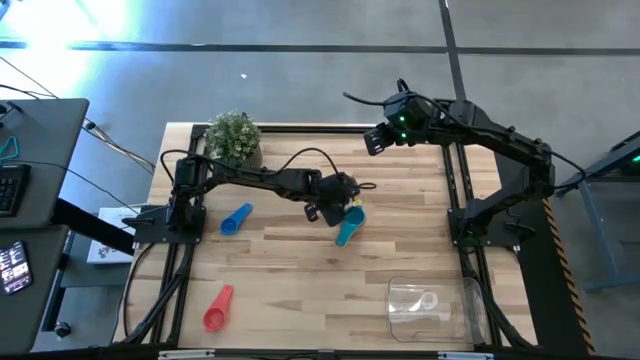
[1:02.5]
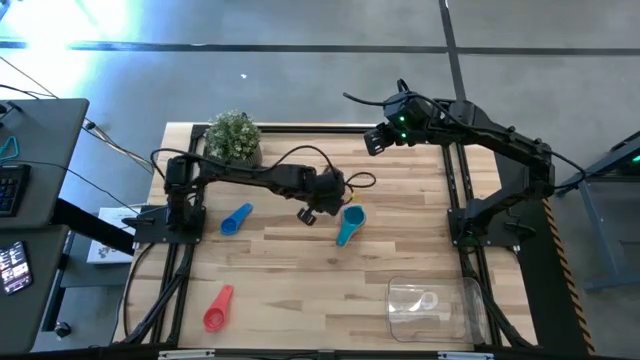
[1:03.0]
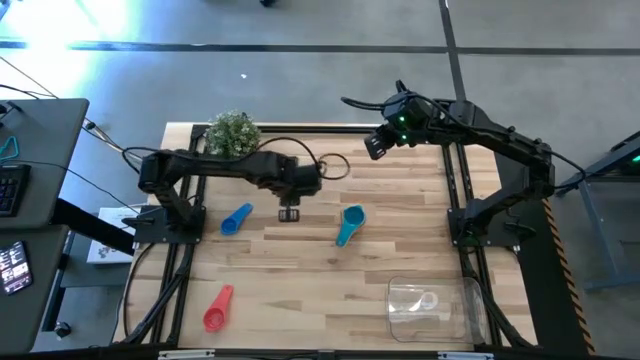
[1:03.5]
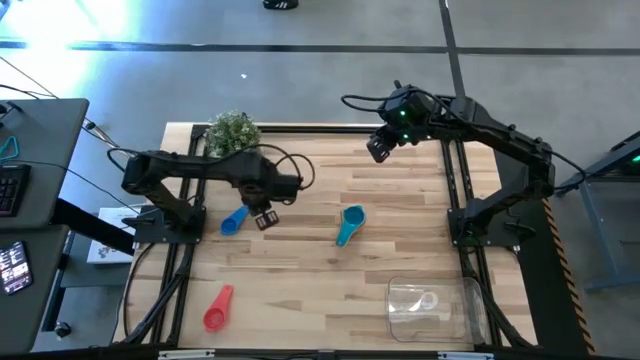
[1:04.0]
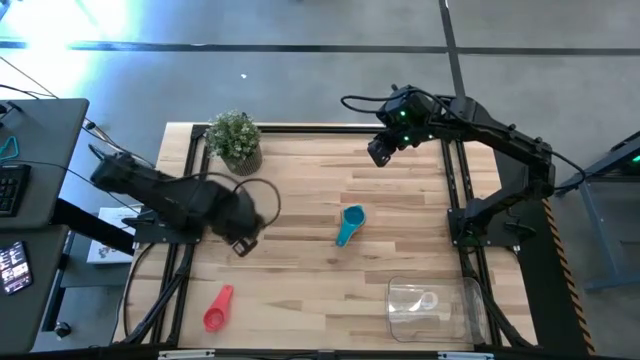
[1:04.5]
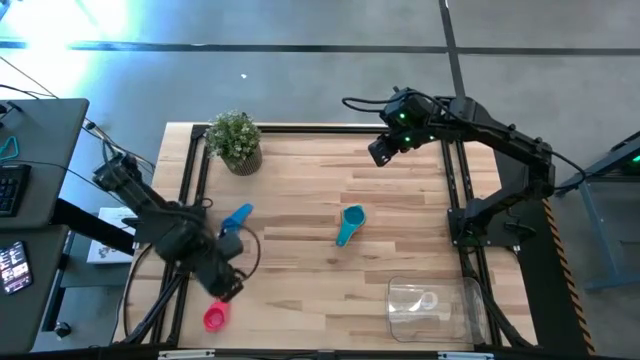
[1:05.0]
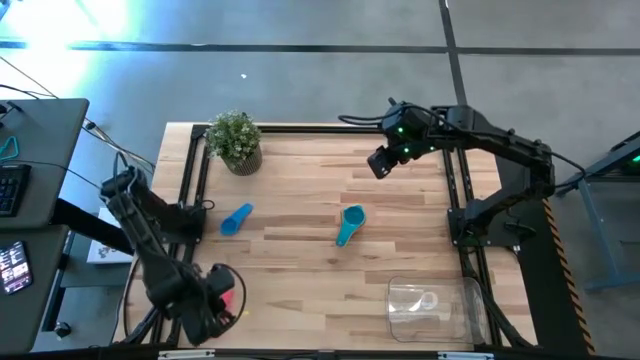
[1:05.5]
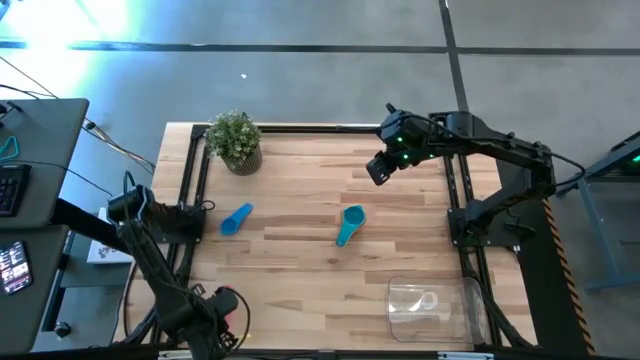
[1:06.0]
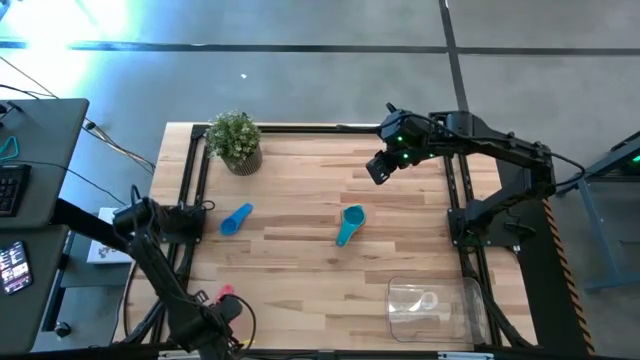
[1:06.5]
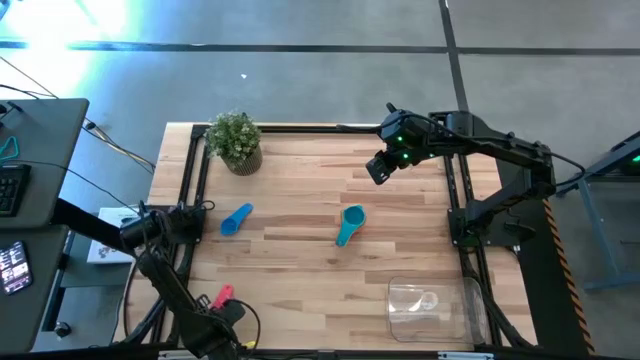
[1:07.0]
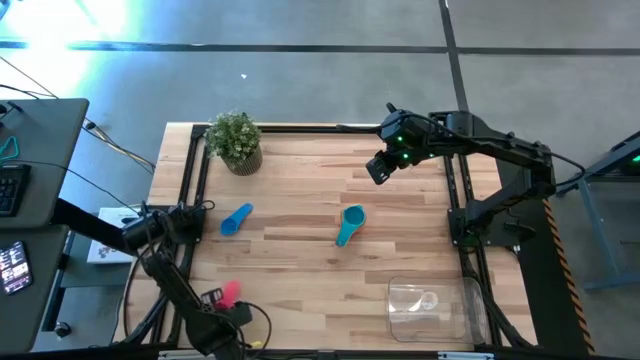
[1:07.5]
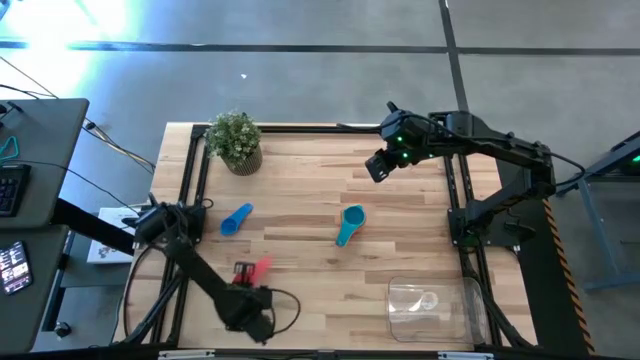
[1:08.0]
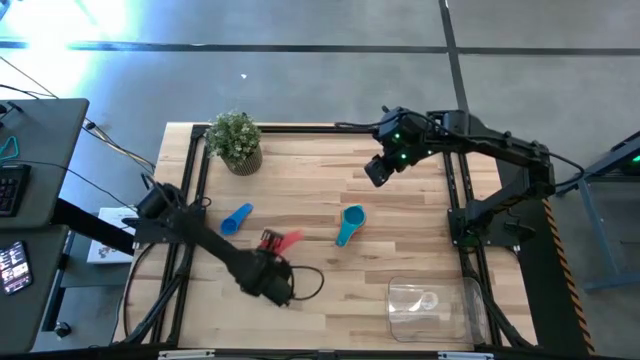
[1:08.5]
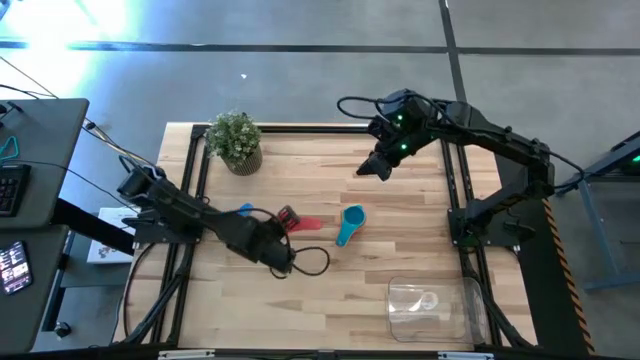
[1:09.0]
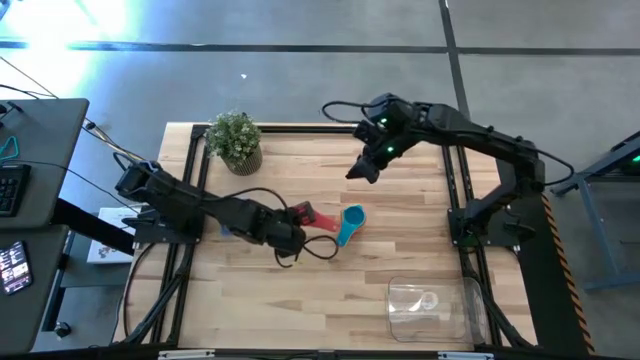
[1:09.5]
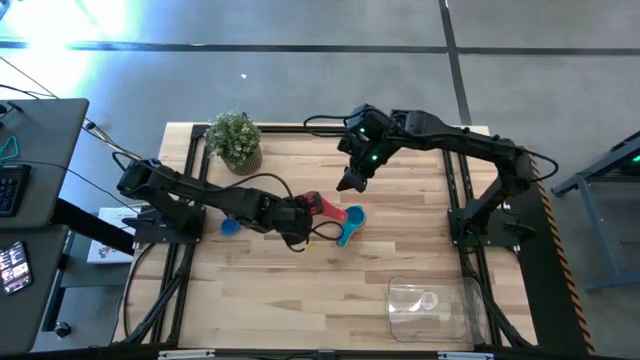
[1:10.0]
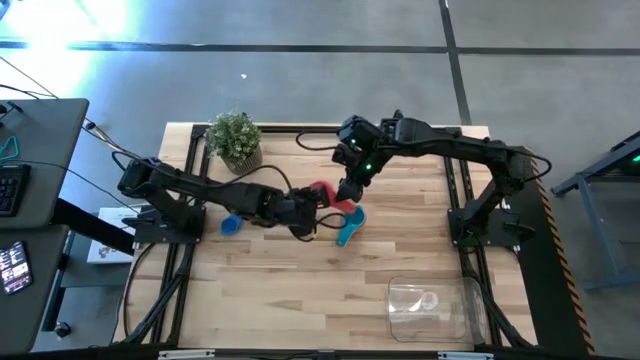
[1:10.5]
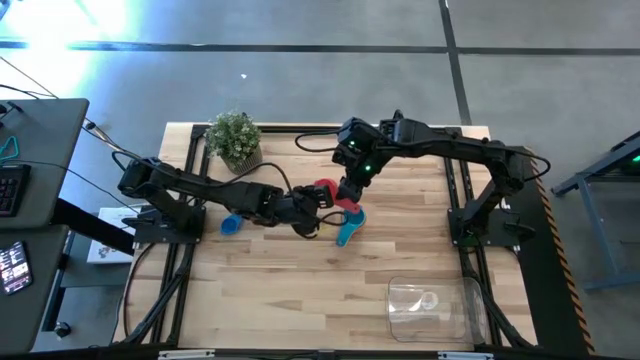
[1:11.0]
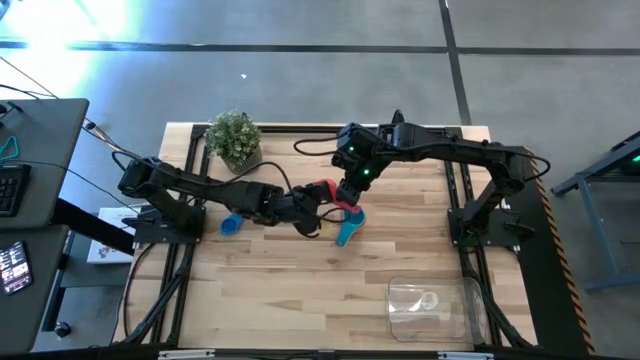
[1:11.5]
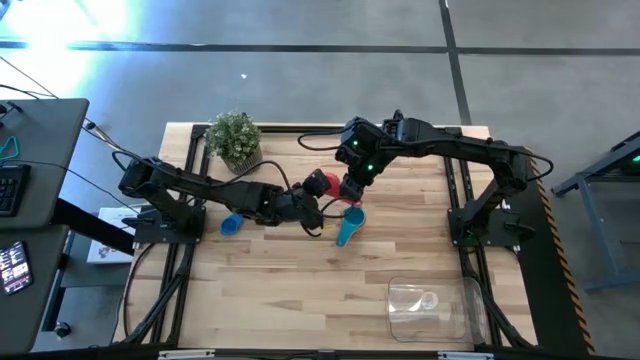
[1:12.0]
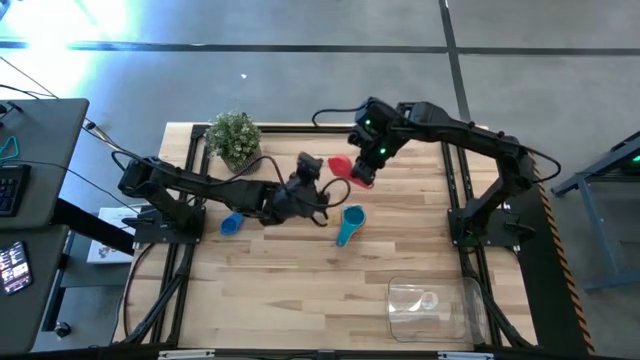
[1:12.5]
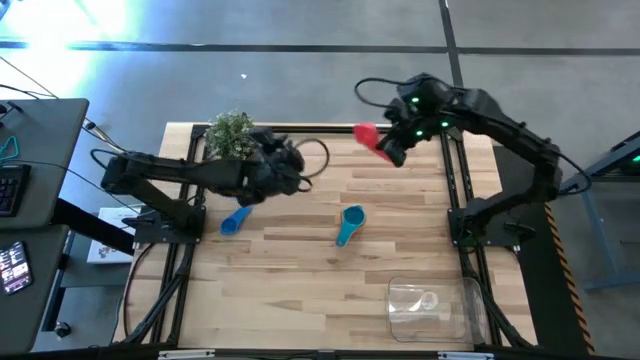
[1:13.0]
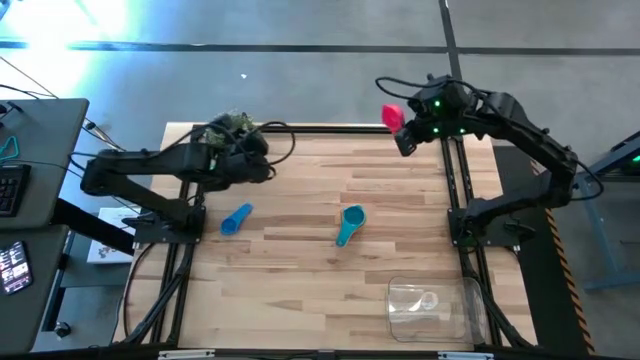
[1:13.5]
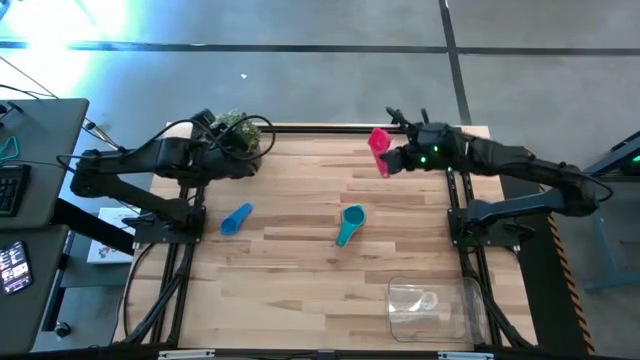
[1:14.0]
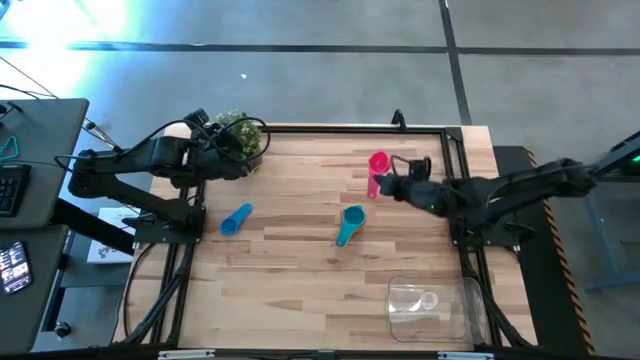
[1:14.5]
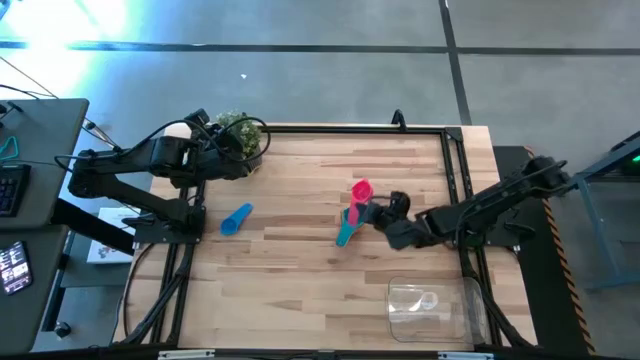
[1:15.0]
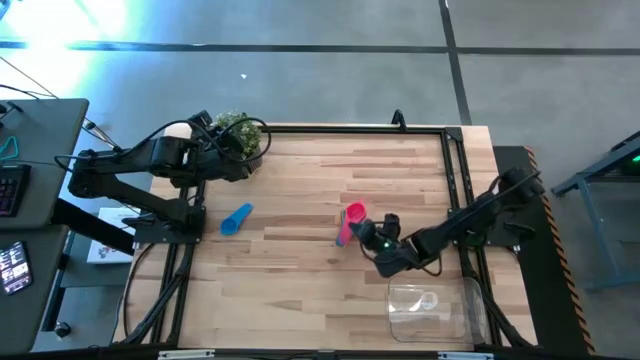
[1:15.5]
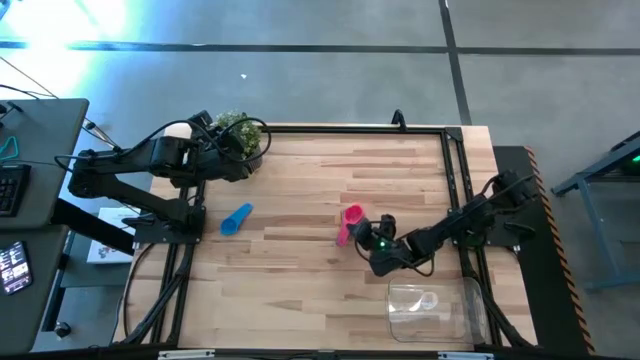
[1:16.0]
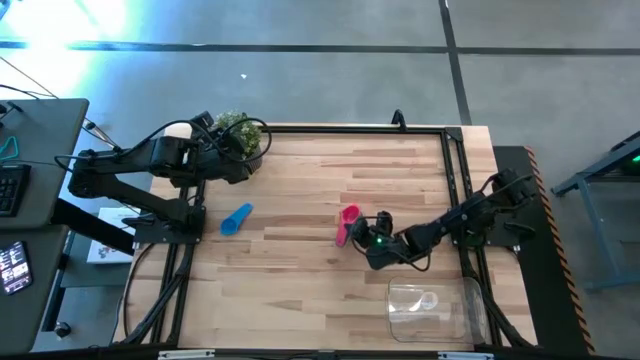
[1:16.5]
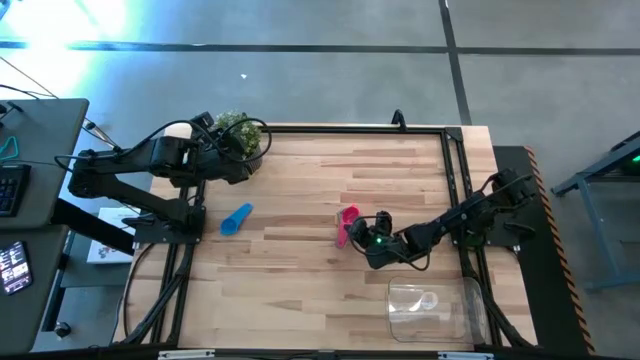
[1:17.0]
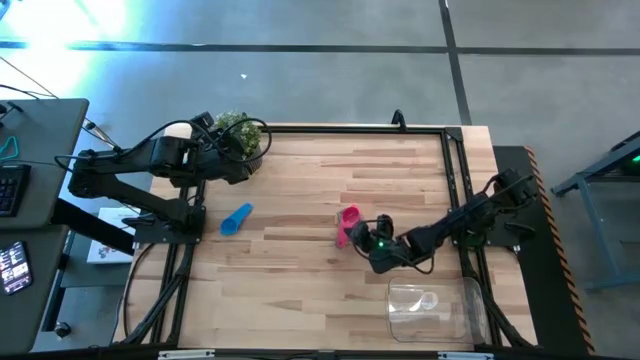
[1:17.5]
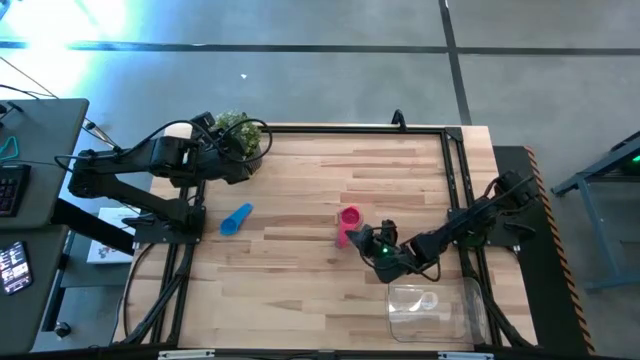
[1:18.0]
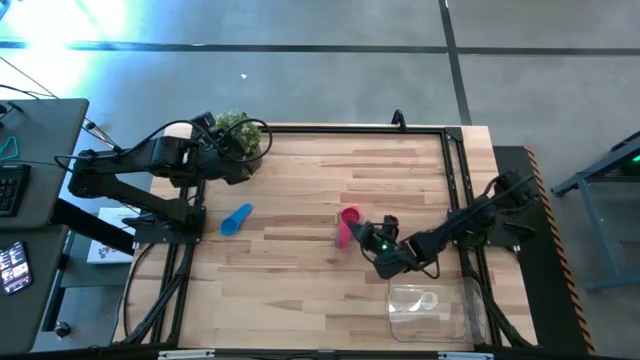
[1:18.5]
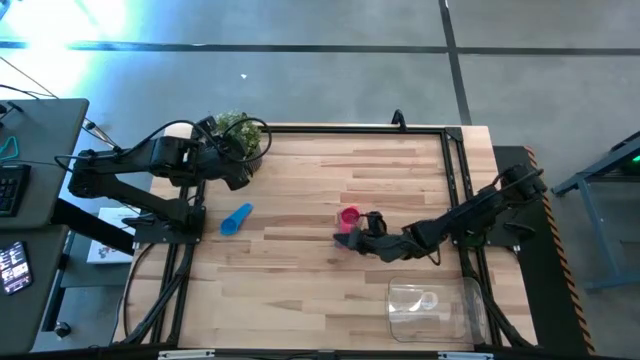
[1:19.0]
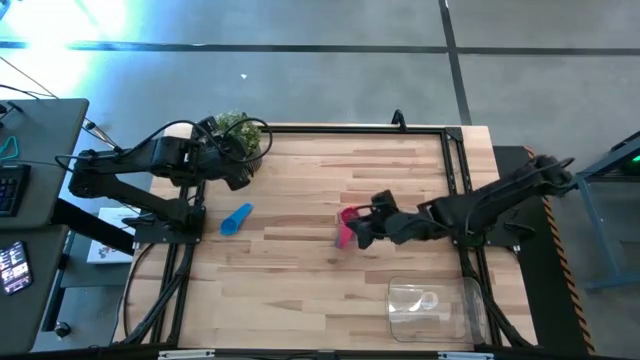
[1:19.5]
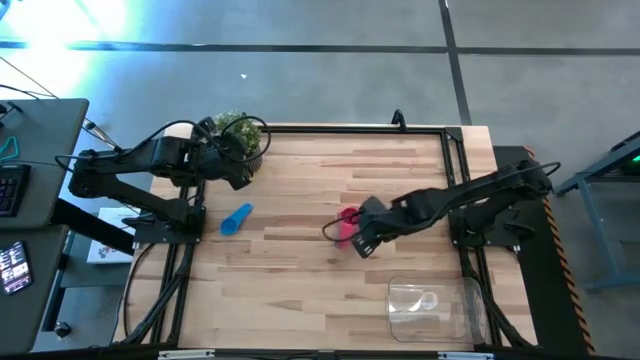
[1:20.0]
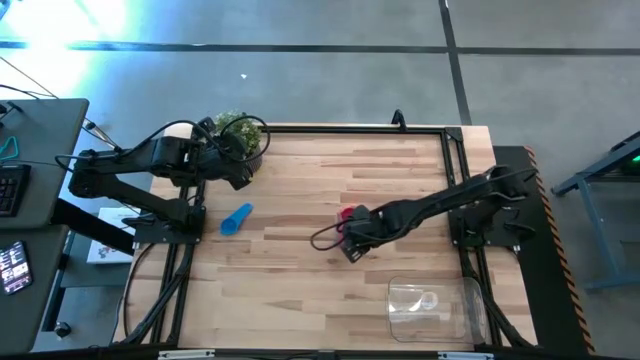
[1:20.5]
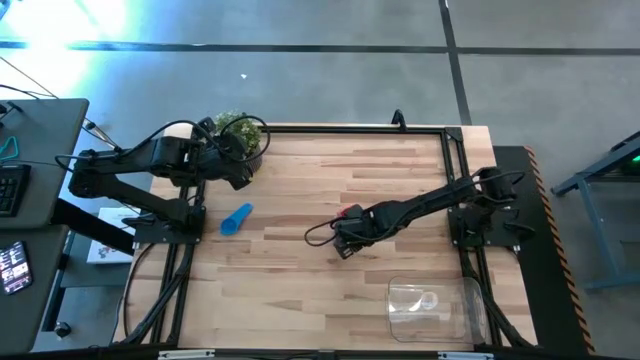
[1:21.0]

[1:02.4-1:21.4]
Task: Nest measuring cups in basket
Stack the red measuring cup on top of the light blue measuring cup

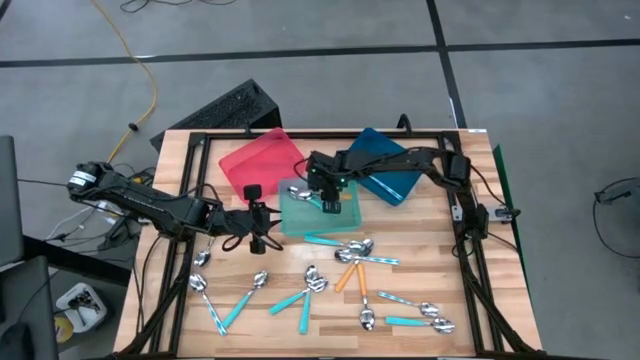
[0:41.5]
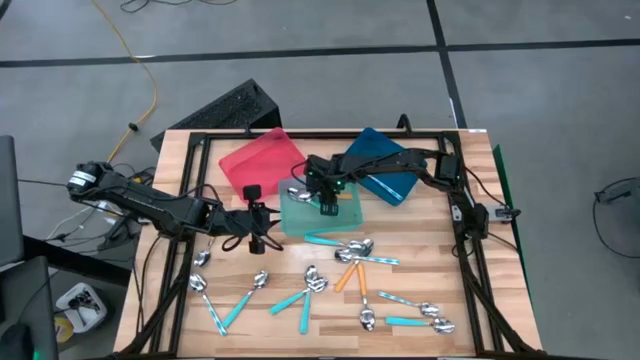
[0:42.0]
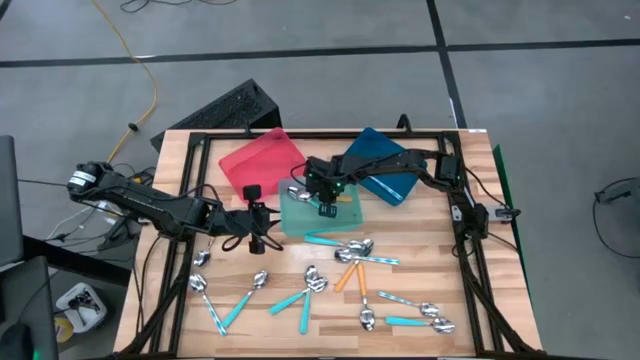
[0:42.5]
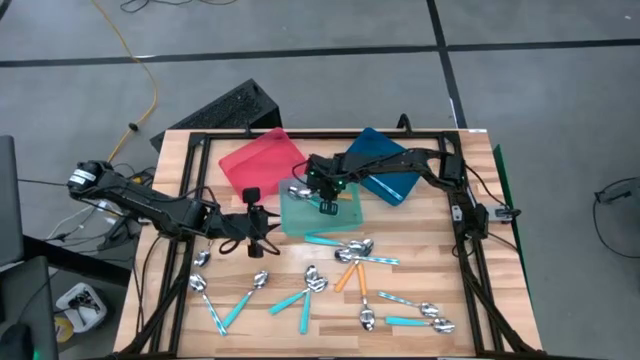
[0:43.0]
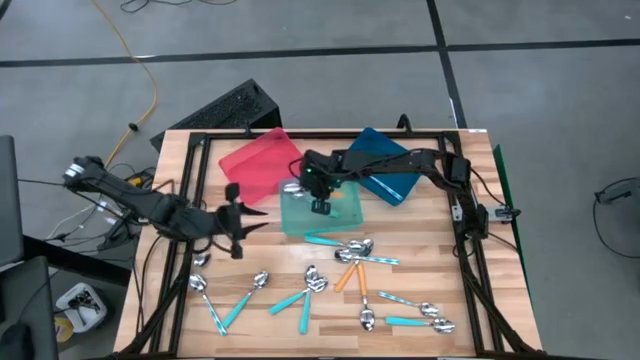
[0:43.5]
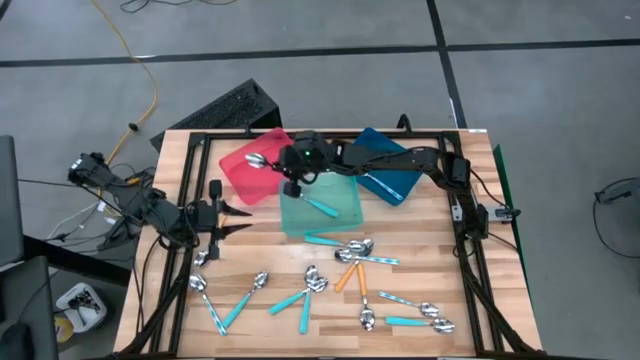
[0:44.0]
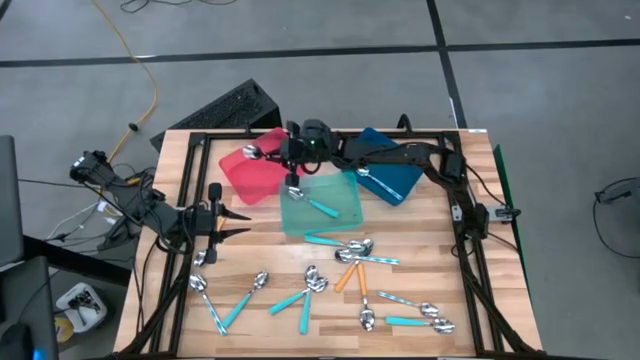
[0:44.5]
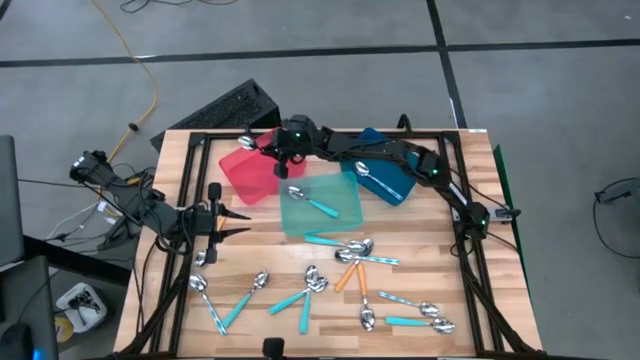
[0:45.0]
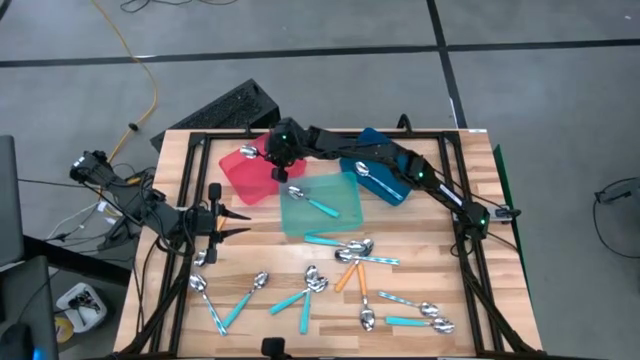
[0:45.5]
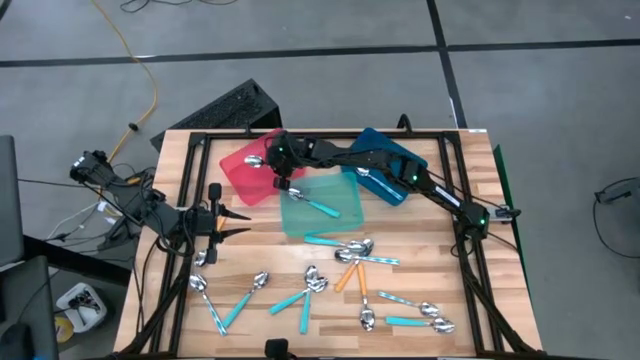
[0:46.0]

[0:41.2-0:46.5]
Task: Sort silverware by color (type)
Put the orange spoon into the red bin
